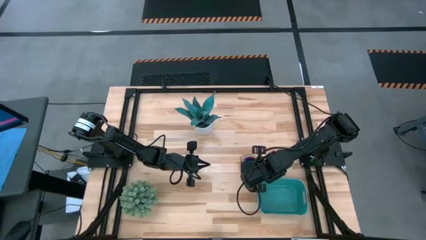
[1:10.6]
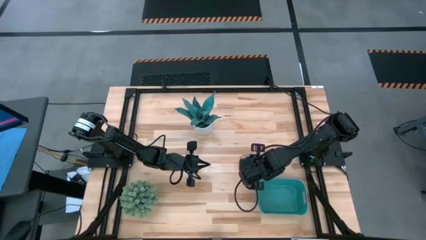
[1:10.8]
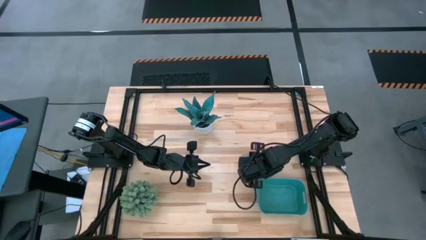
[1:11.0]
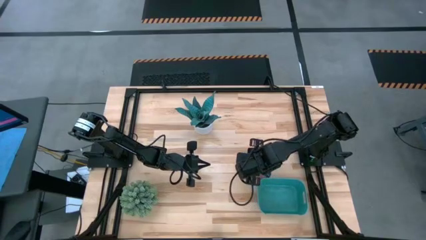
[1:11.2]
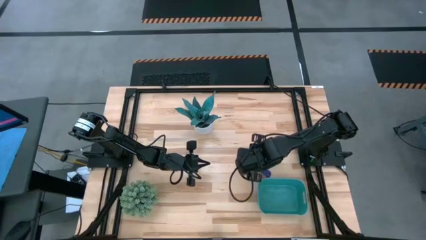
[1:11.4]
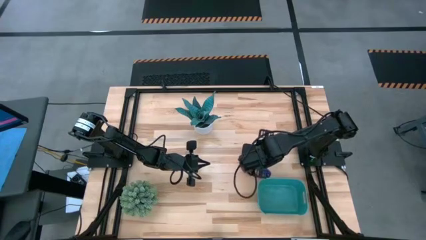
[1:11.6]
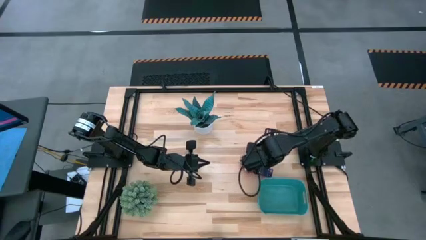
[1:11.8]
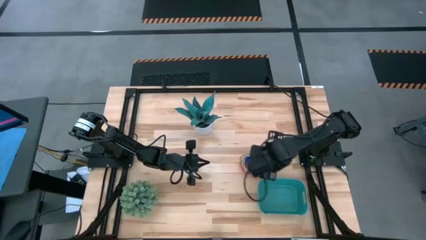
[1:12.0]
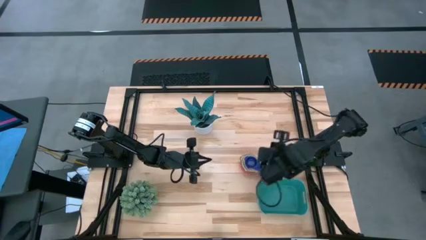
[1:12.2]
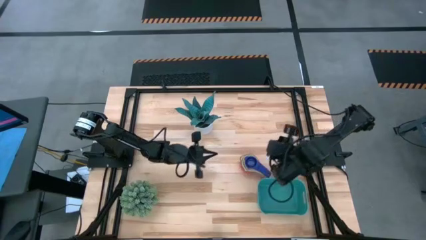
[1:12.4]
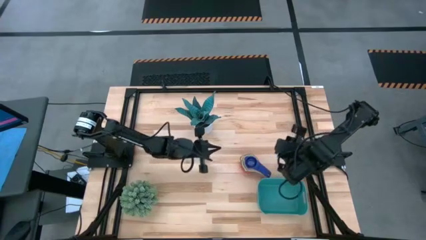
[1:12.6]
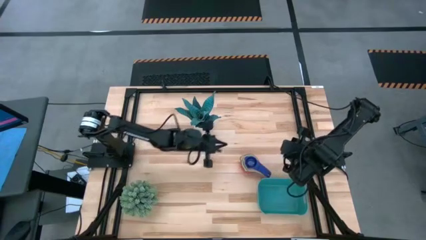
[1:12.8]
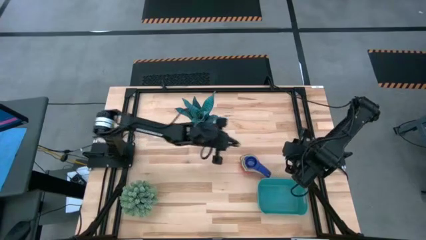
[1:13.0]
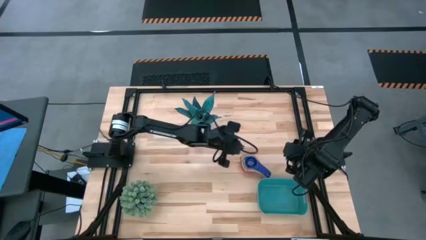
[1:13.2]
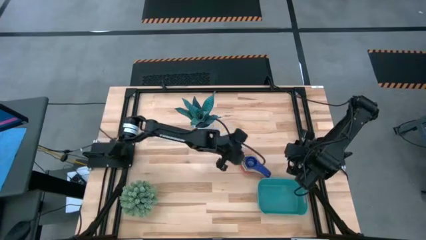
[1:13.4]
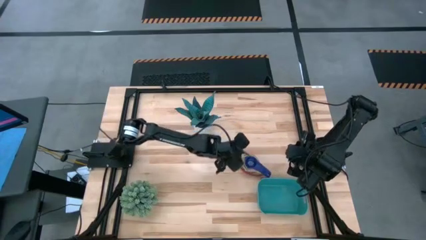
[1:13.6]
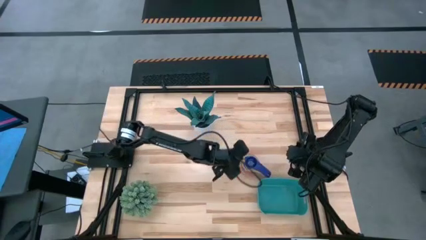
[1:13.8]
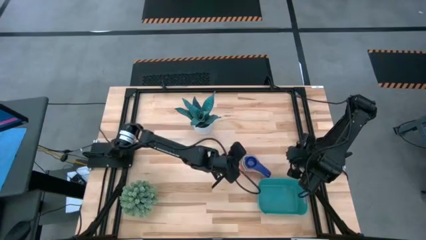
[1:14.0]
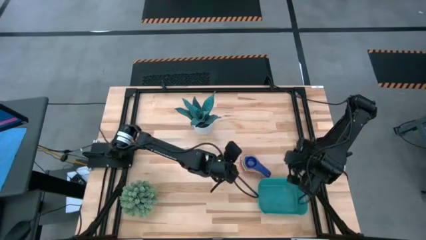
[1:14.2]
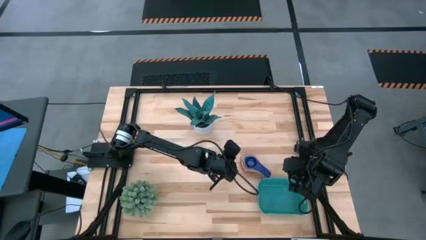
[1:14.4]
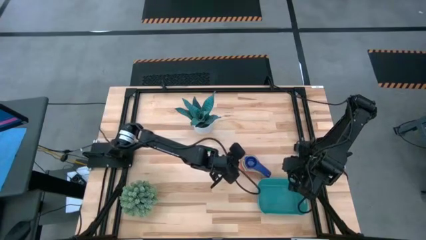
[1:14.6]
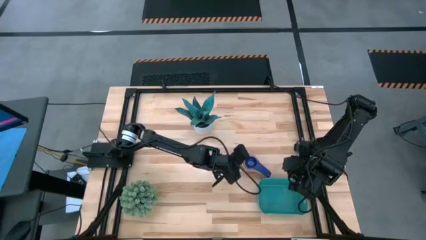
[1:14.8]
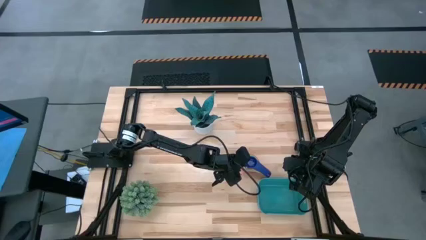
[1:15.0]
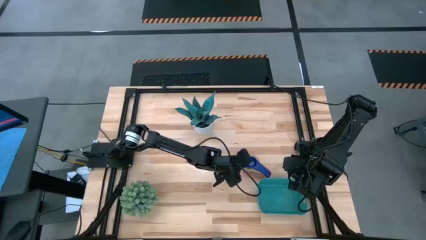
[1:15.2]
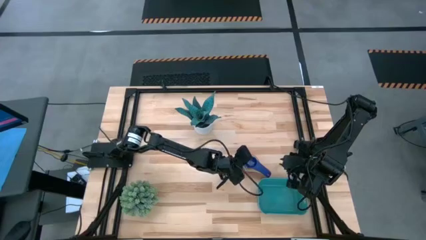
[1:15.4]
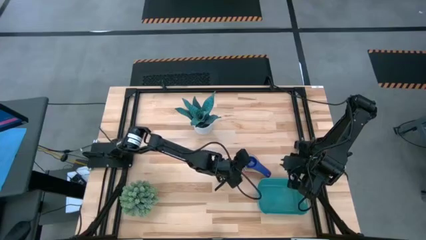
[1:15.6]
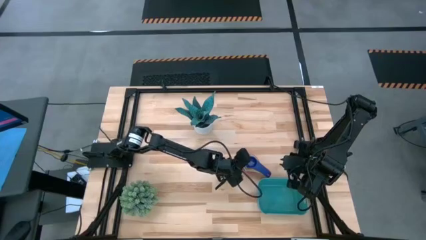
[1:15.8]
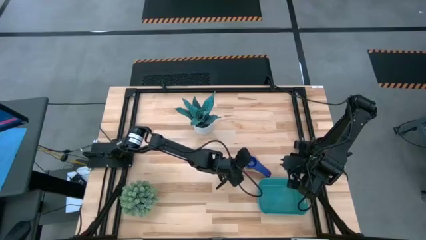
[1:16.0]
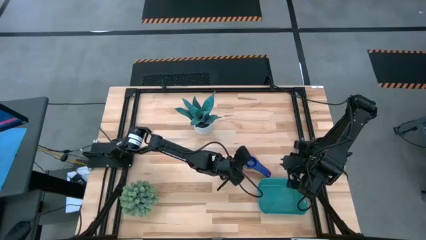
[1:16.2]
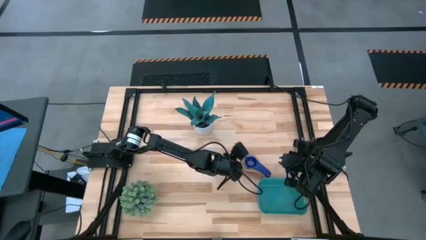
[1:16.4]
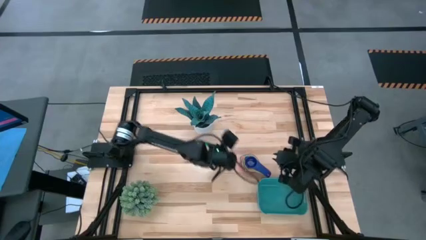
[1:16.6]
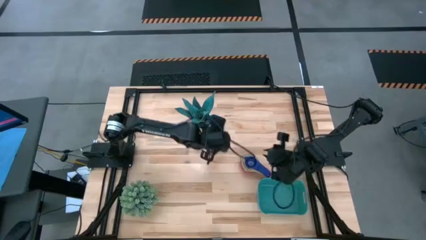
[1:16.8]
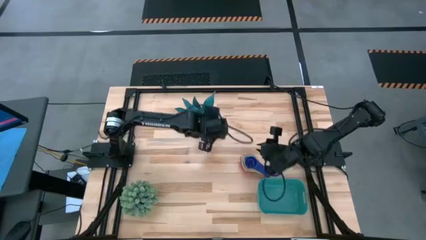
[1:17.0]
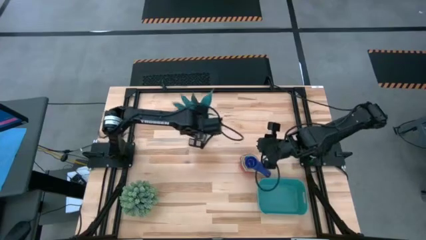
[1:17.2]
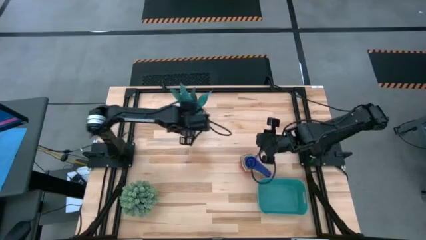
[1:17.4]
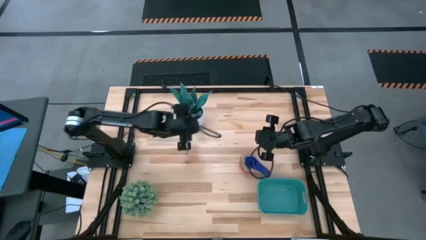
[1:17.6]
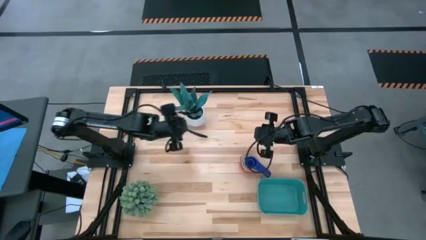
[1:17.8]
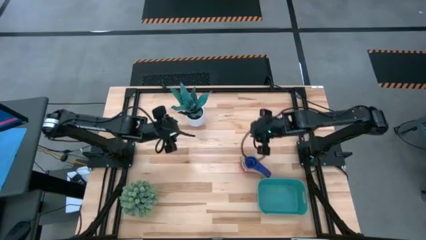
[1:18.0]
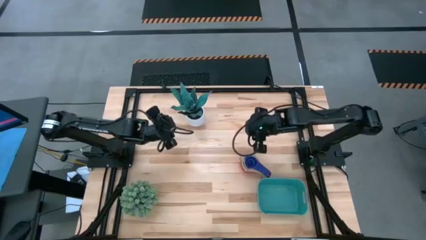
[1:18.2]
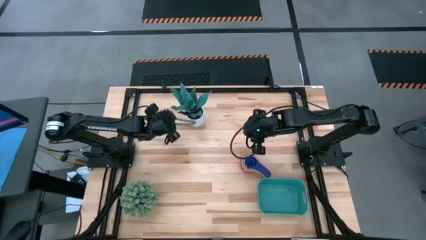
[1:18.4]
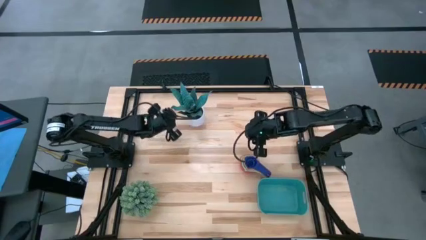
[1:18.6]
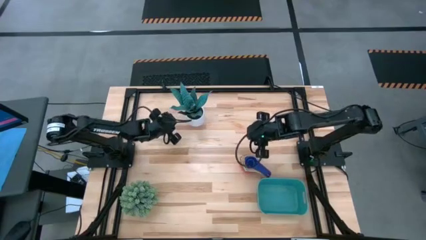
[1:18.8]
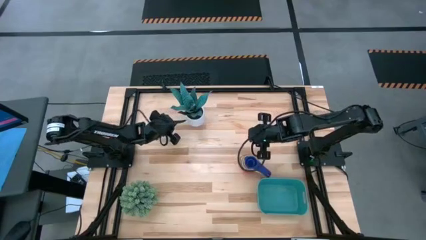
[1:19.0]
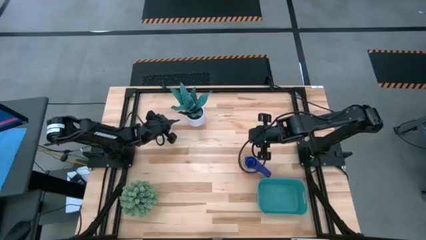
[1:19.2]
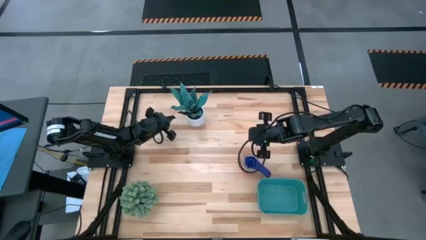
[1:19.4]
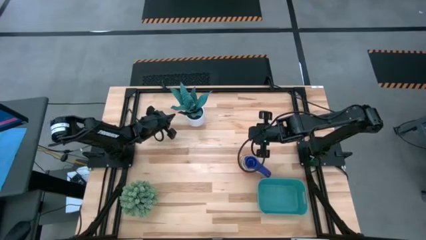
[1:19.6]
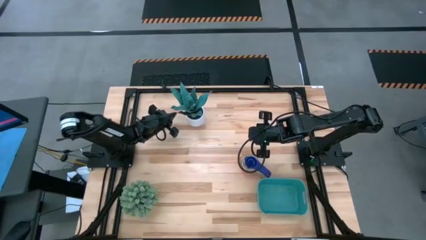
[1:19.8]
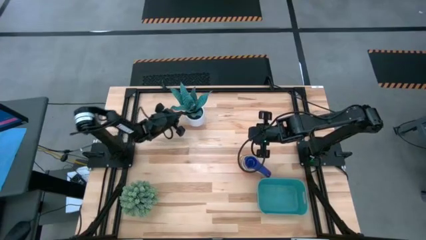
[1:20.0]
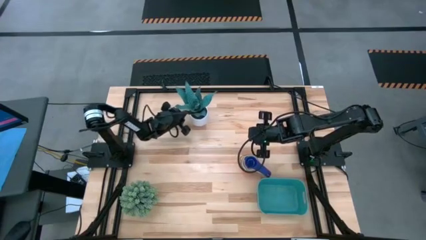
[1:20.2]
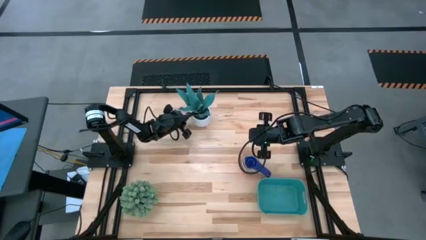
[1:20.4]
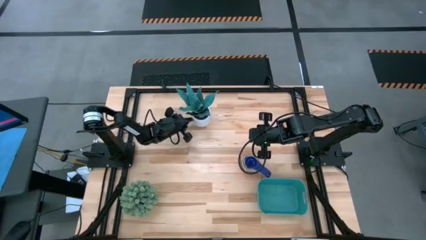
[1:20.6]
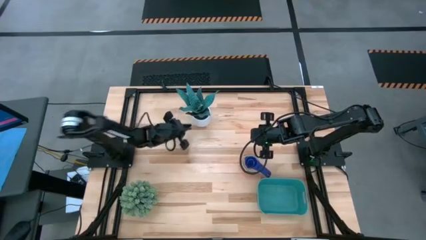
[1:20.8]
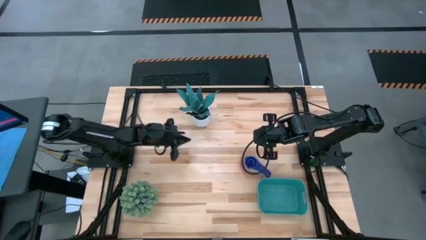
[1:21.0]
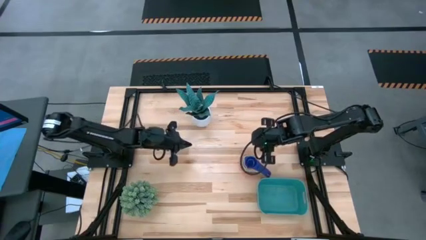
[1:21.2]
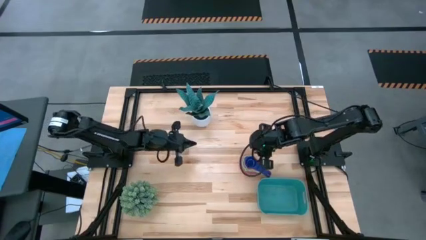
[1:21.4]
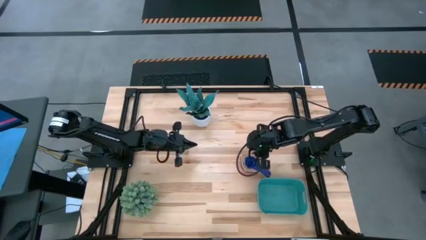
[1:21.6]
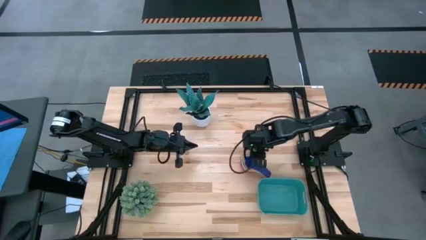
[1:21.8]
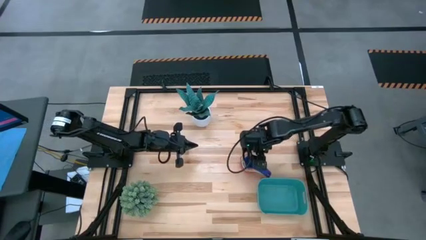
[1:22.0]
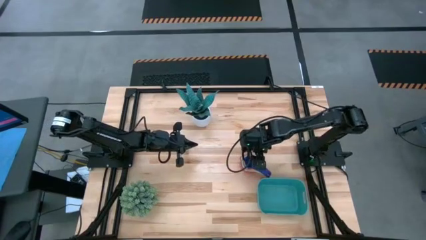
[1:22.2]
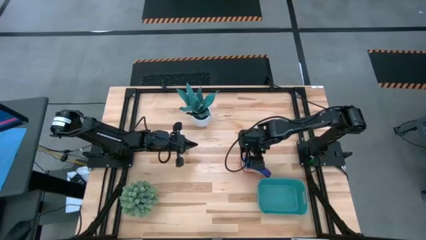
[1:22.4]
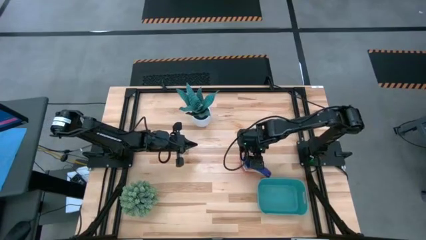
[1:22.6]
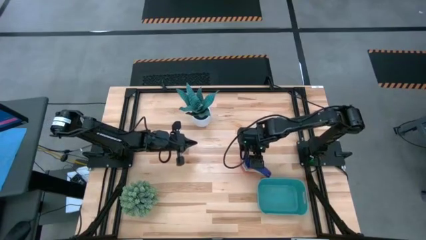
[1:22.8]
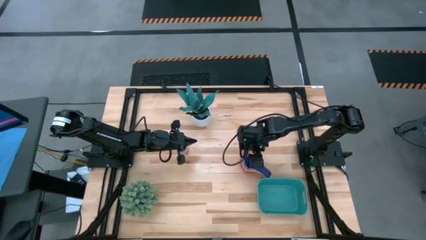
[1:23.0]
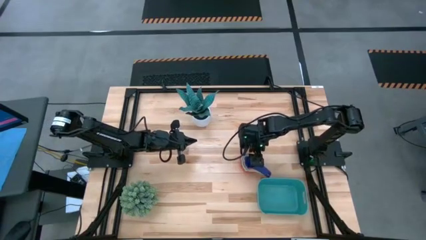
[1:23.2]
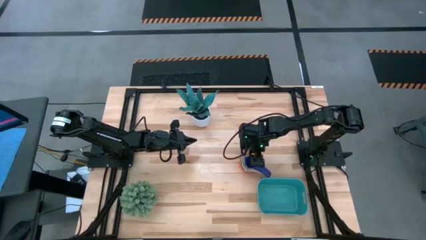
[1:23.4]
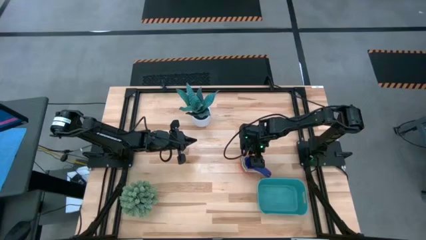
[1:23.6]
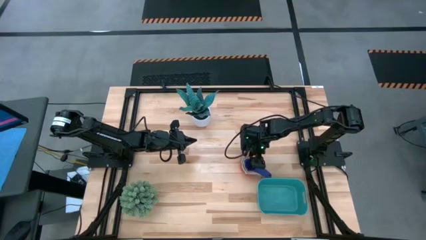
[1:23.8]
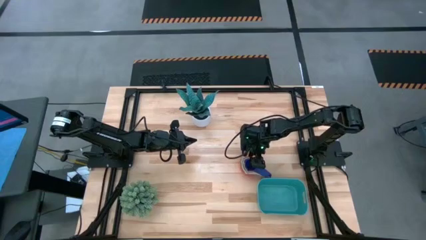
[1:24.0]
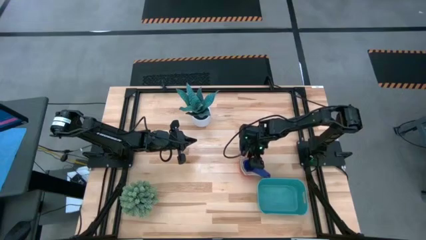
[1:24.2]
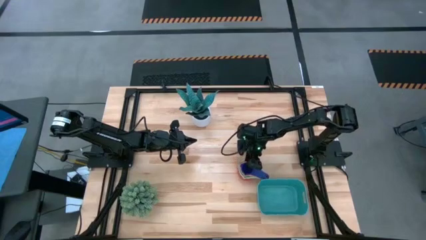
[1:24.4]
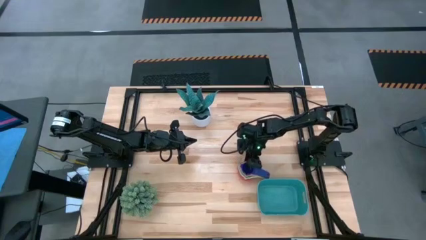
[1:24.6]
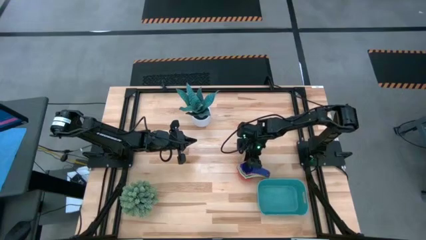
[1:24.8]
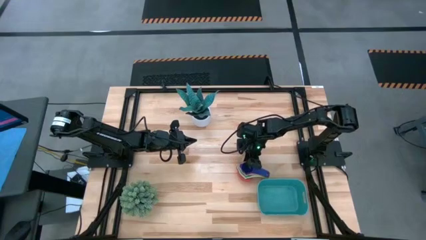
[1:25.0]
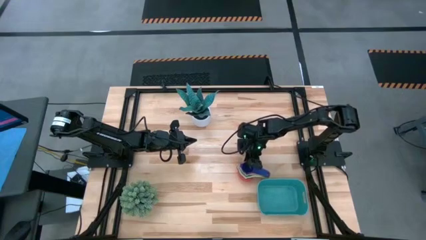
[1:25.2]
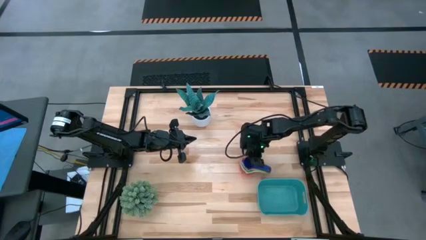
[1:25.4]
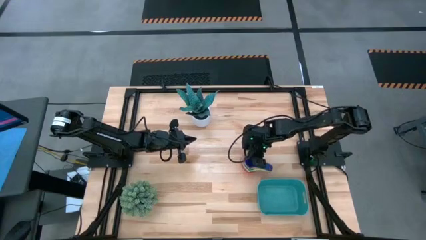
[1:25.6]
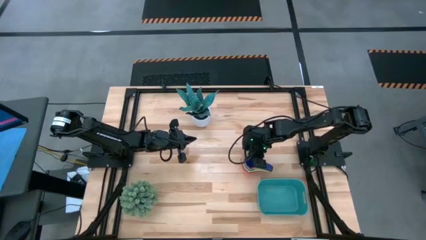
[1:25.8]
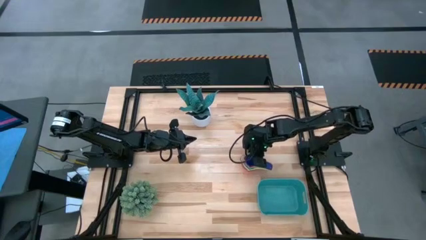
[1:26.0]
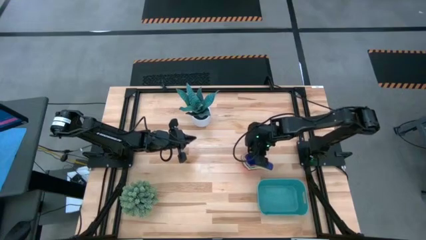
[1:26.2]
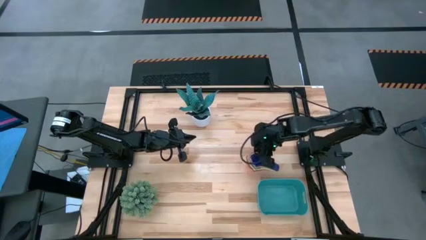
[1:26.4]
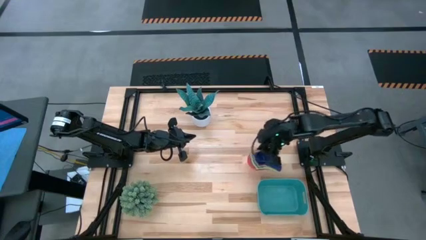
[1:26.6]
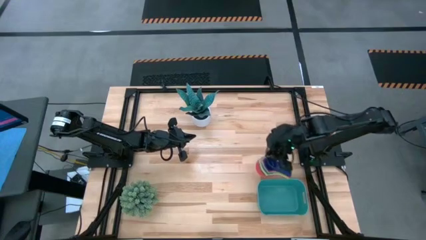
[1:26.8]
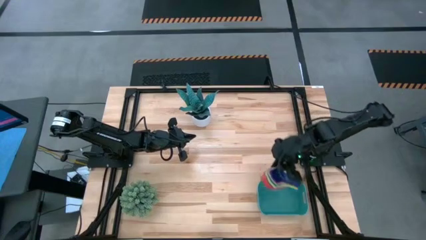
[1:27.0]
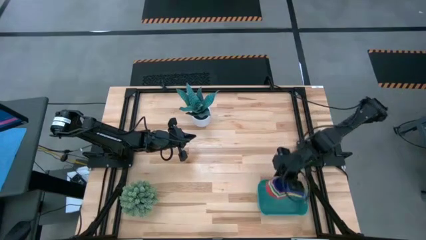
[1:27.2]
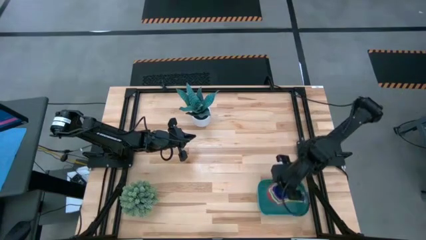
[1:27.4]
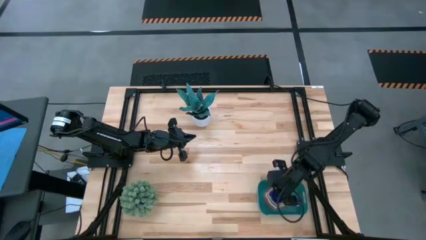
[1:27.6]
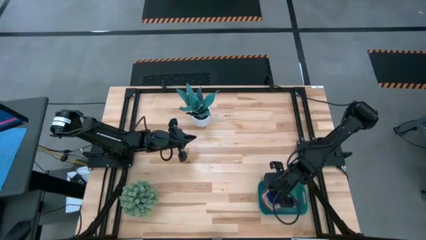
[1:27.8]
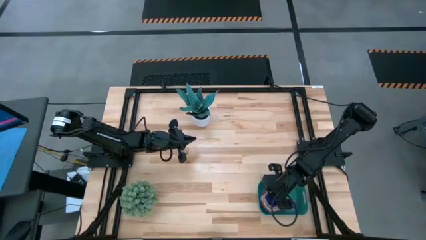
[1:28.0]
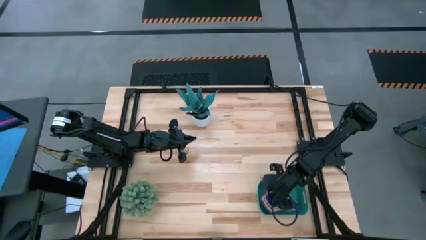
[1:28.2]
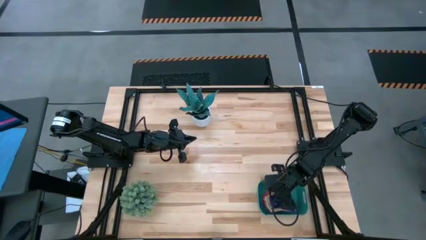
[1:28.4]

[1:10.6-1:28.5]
Task: Nest measuring cups in basket
Put the stacked measuring cups into the green bin
